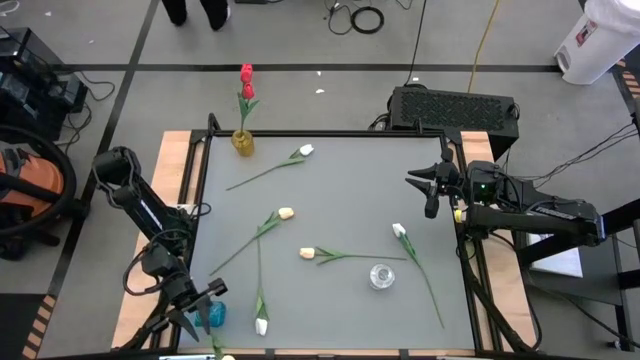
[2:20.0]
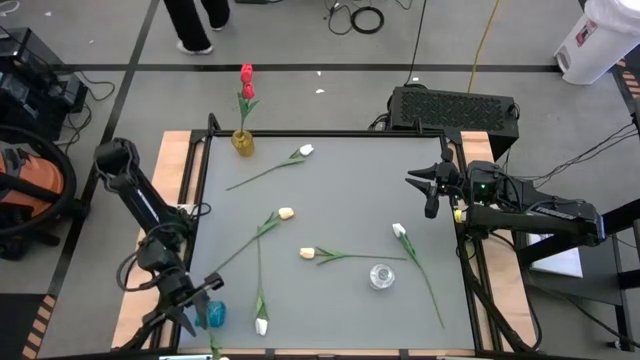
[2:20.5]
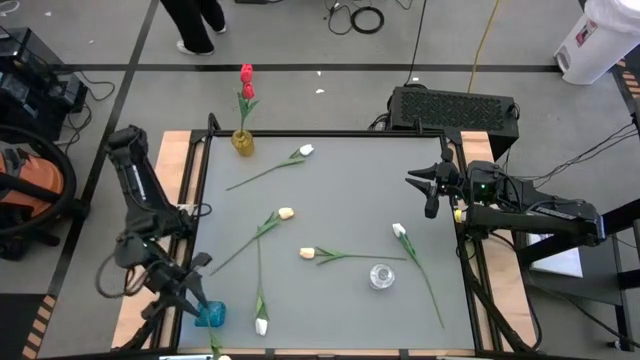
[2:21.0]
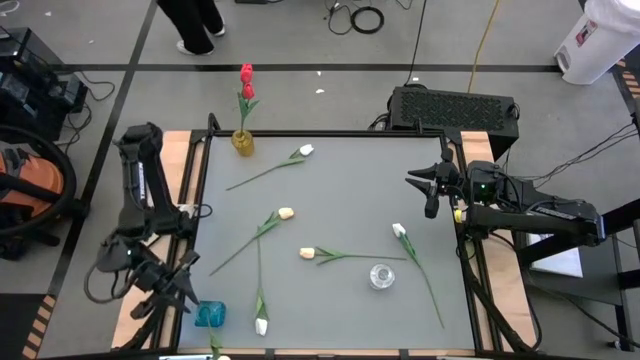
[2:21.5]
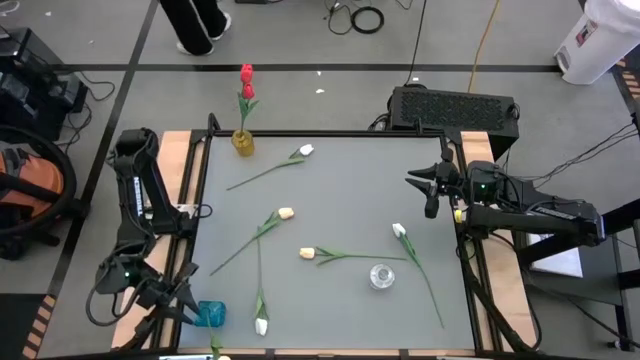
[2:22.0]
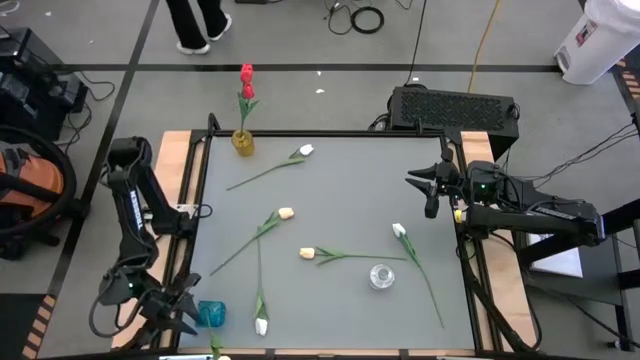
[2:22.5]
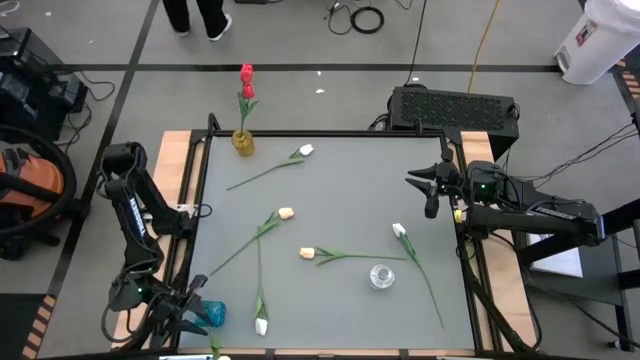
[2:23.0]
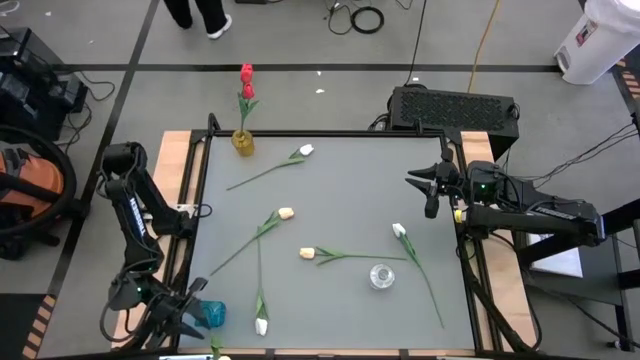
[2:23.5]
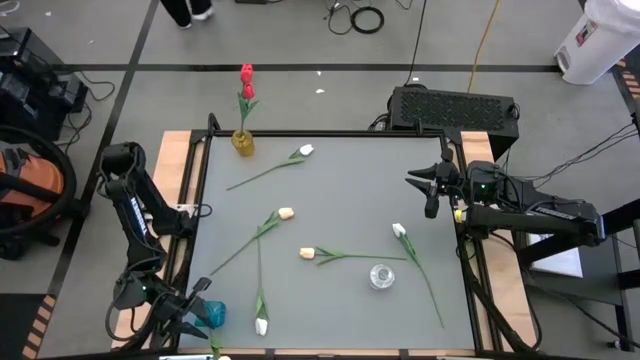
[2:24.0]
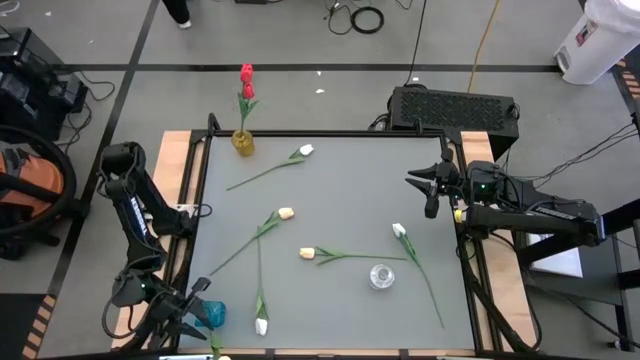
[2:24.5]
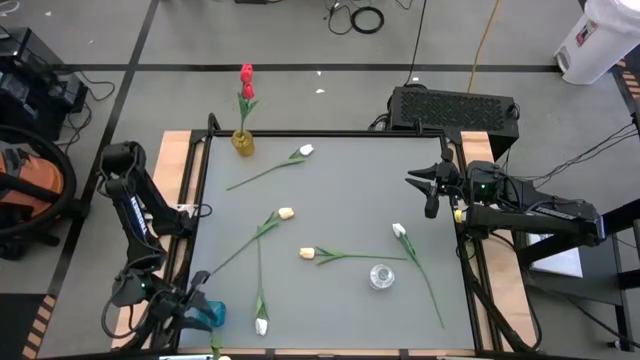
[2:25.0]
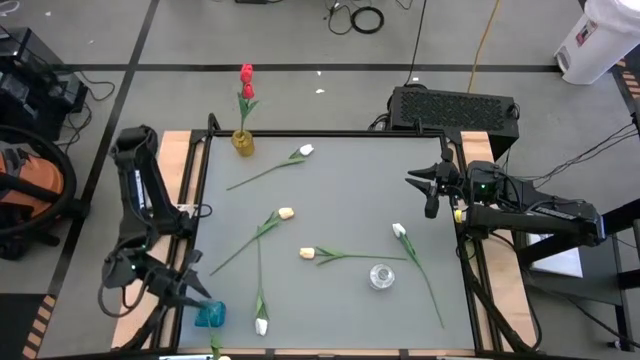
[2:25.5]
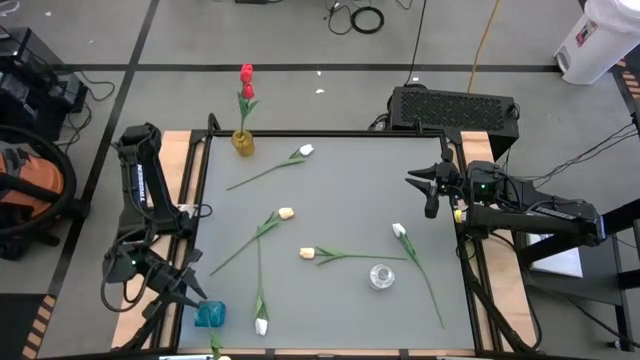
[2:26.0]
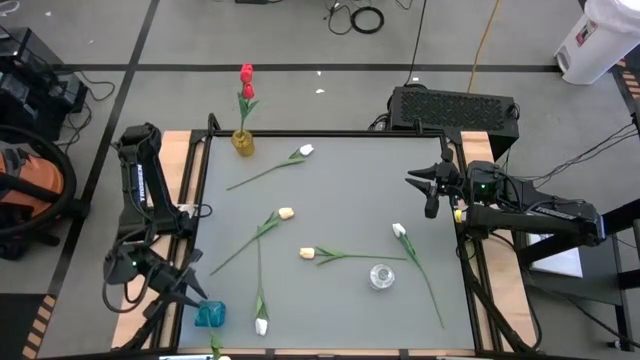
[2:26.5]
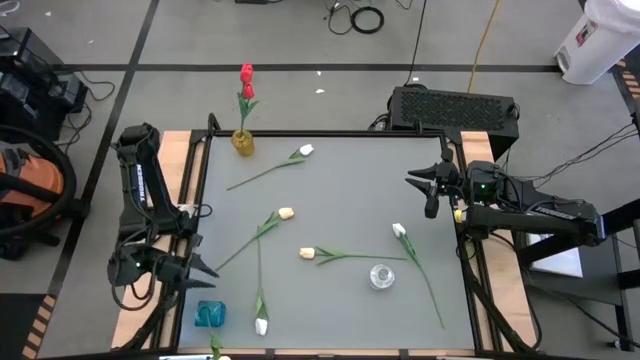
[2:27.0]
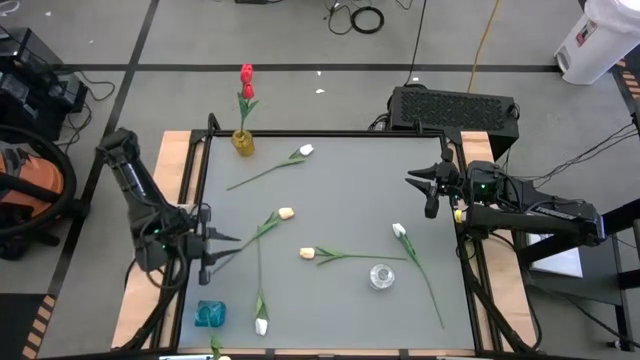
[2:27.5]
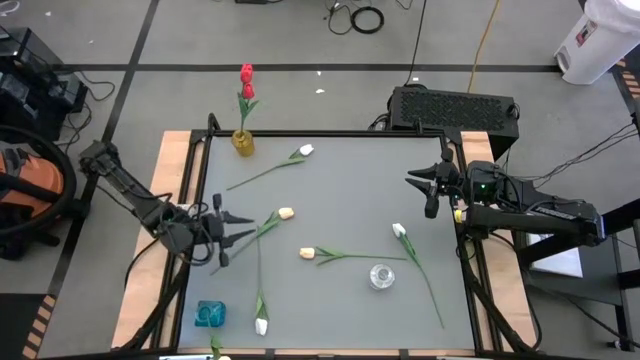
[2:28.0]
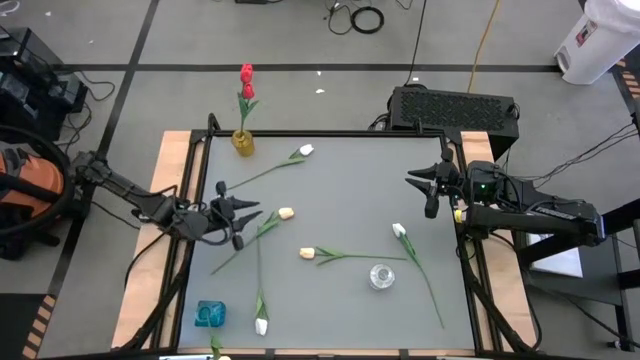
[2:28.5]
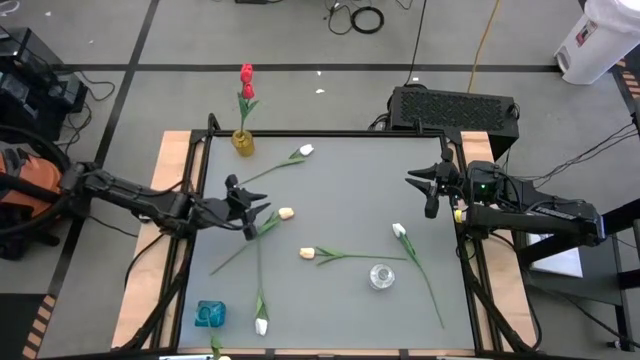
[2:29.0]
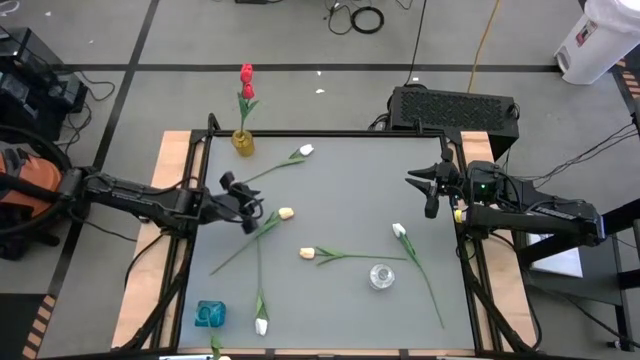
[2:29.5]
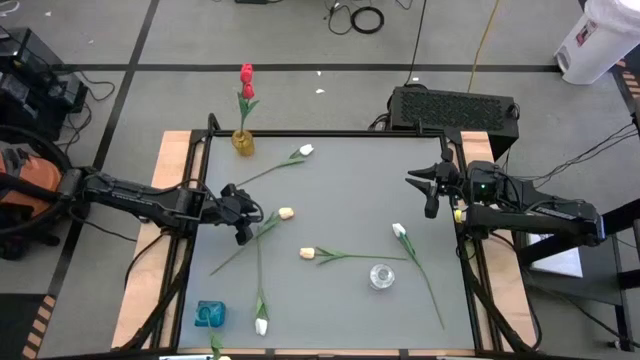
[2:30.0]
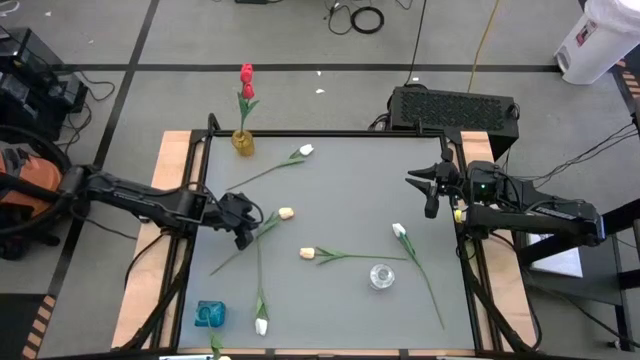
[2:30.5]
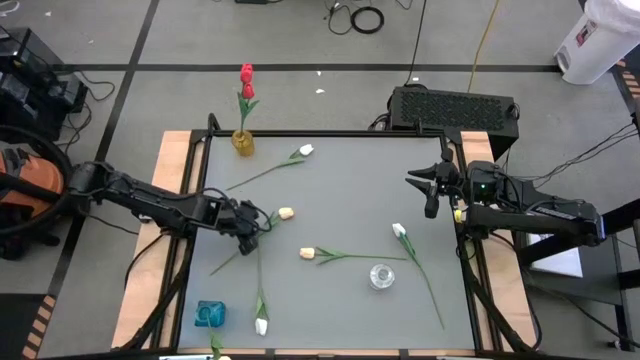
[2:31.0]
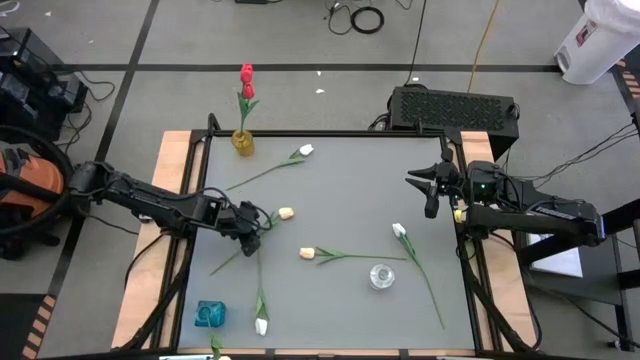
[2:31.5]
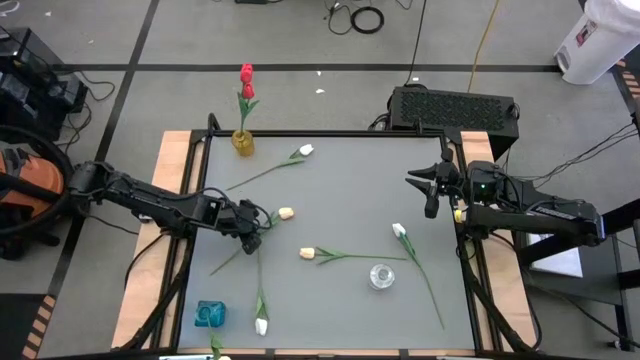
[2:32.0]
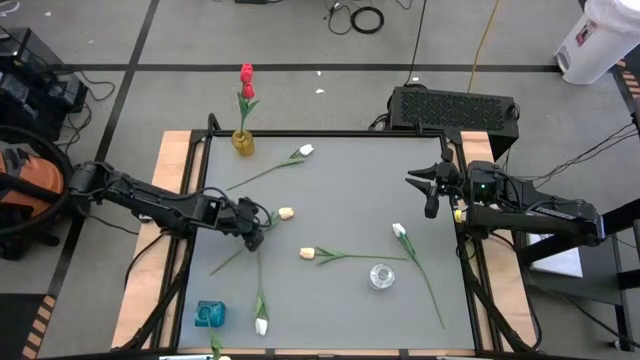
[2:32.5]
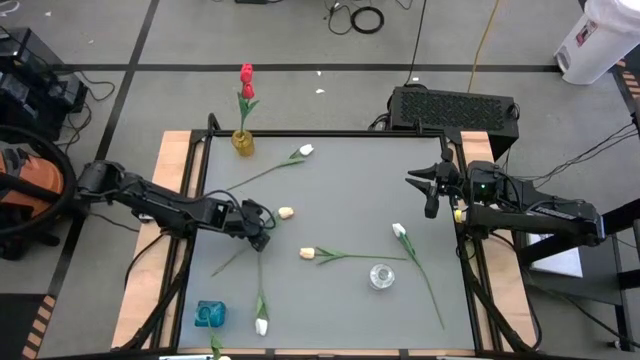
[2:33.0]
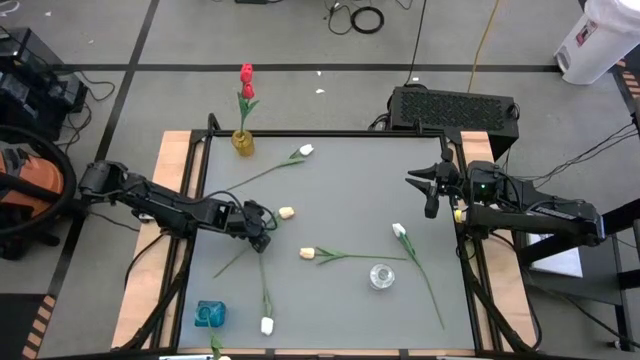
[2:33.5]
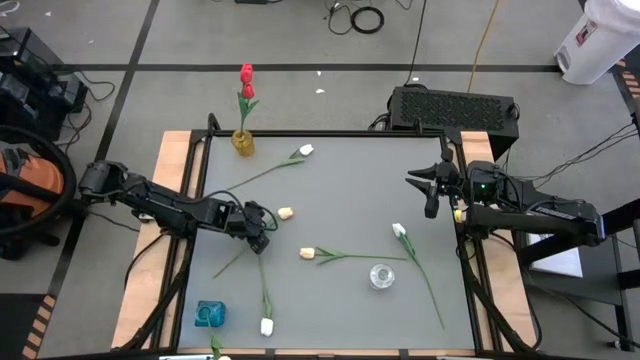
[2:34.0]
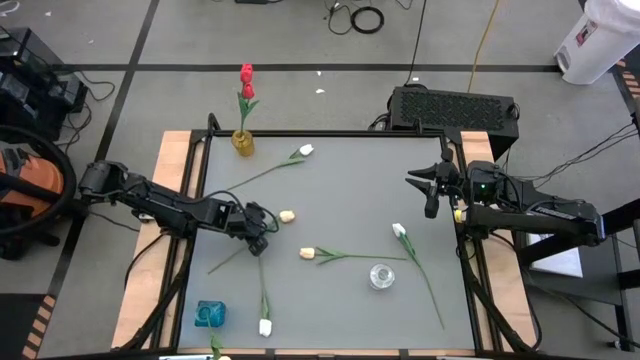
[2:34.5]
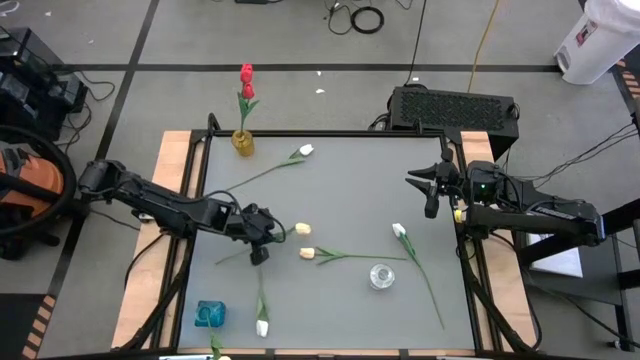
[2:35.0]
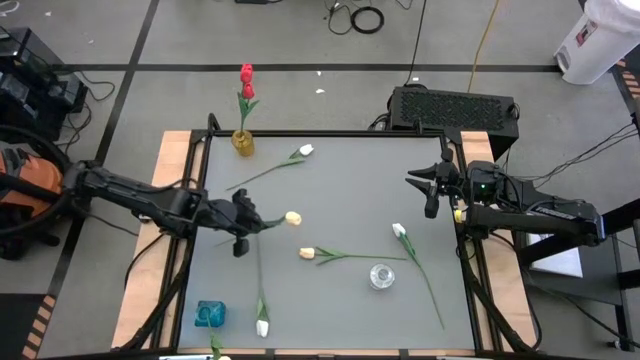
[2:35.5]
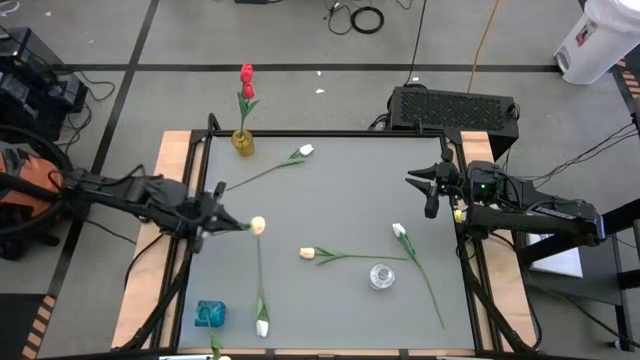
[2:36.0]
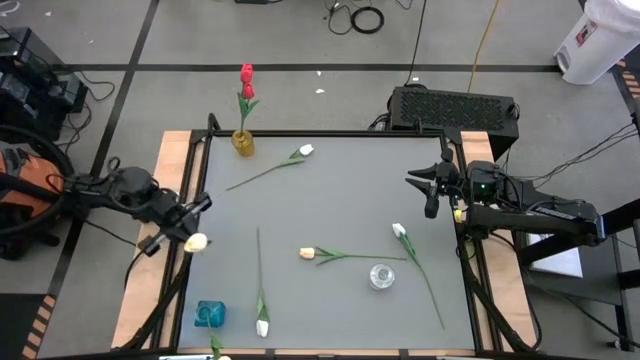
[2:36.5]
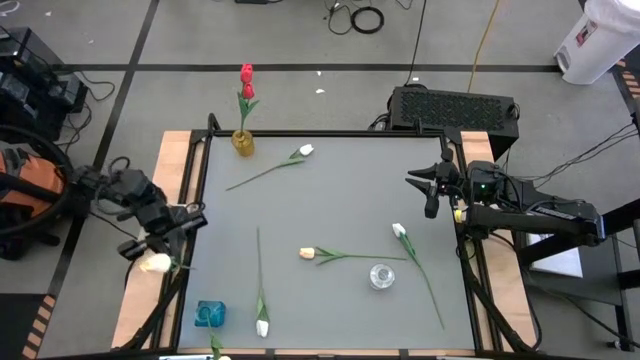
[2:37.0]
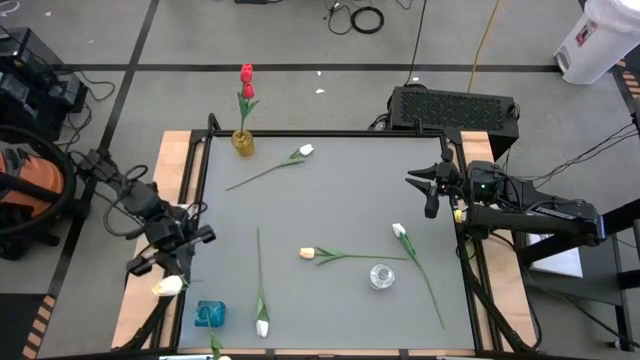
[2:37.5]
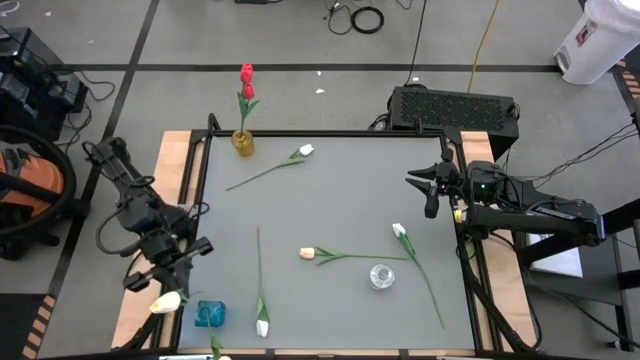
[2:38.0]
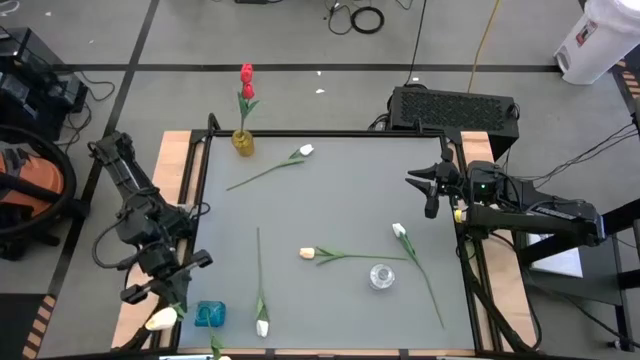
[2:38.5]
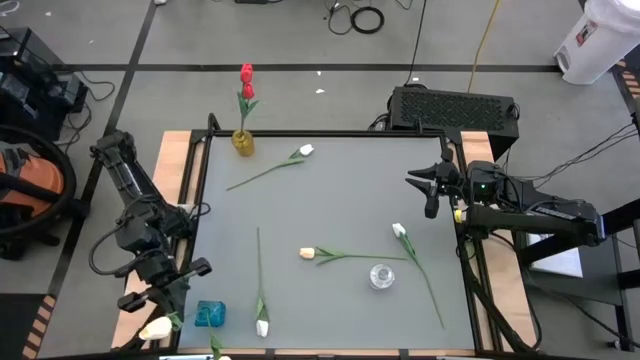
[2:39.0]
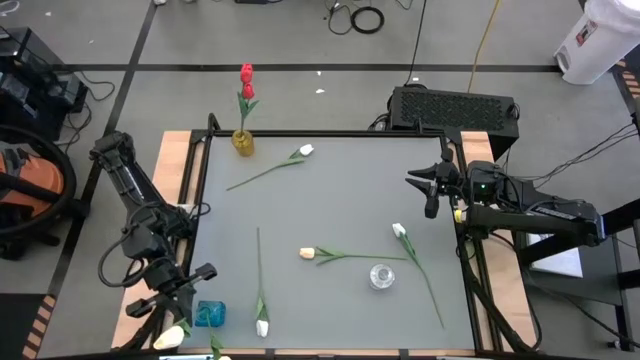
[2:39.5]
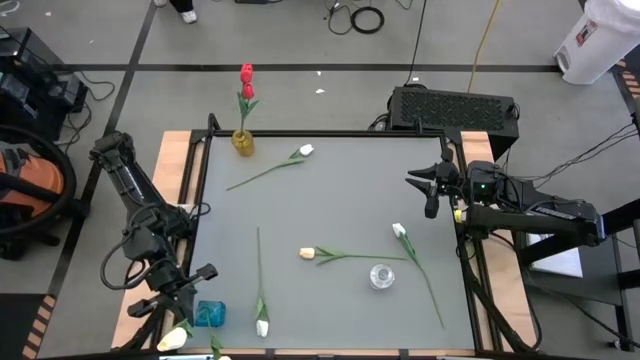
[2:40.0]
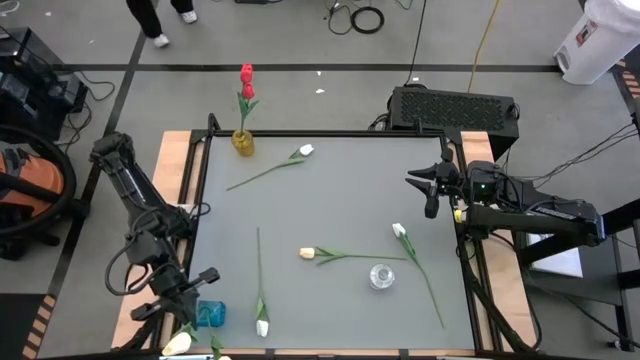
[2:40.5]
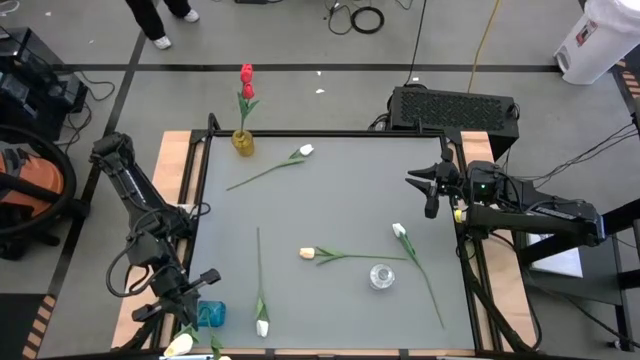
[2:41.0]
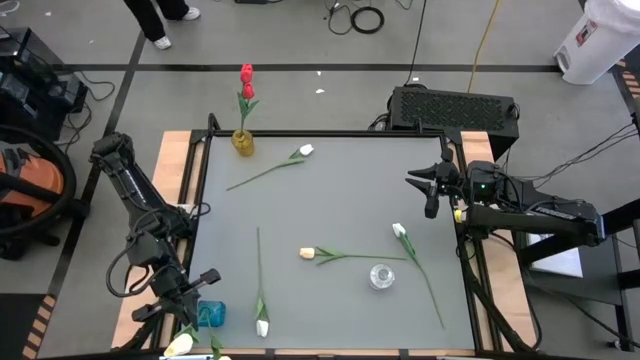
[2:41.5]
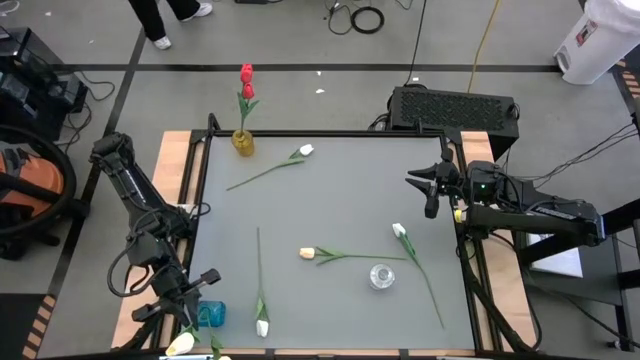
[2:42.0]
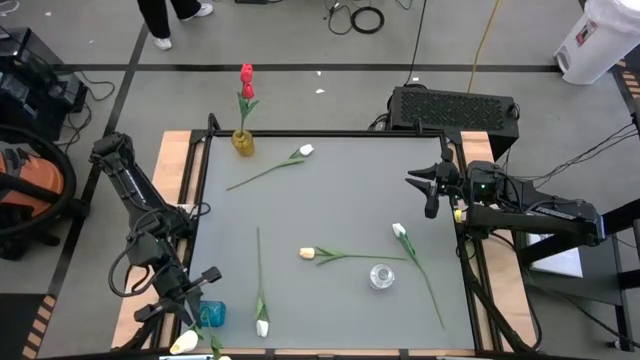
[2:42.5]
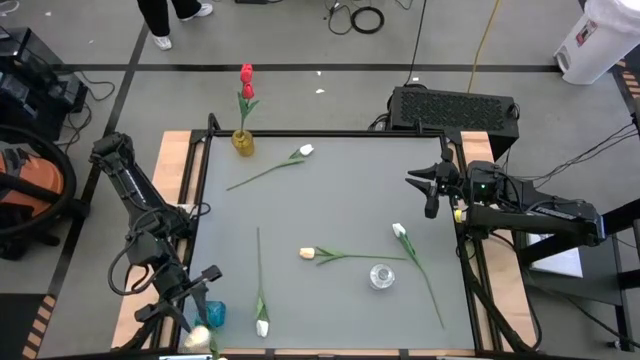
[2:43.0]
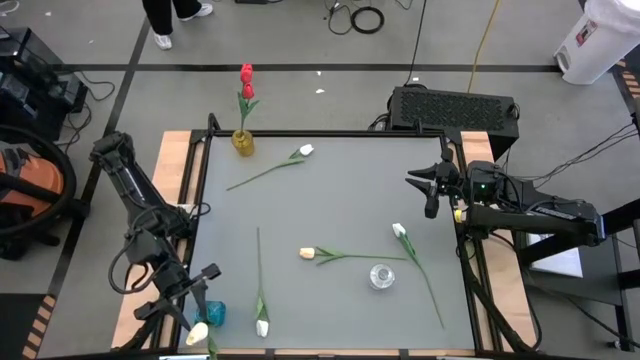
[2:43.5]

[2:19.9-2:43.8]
Task: Sort flowers into vase by color
Put the left yellow tulip into the blue vase
